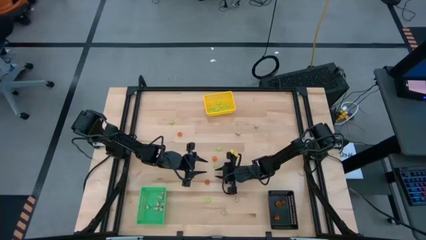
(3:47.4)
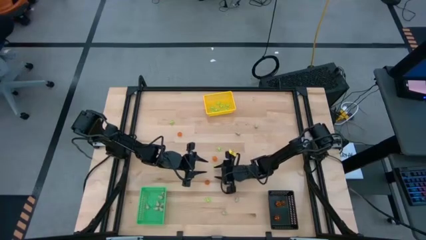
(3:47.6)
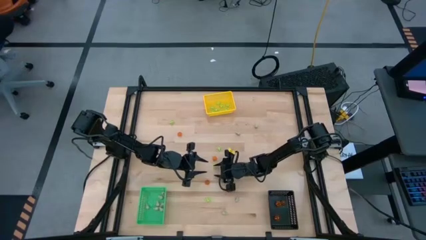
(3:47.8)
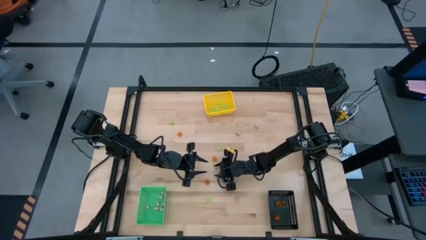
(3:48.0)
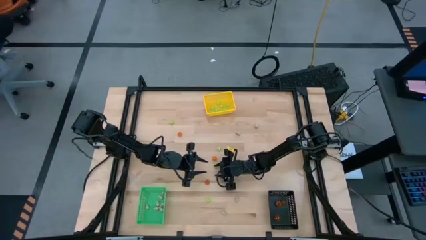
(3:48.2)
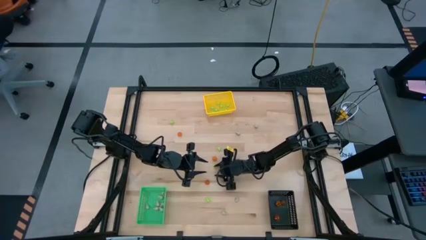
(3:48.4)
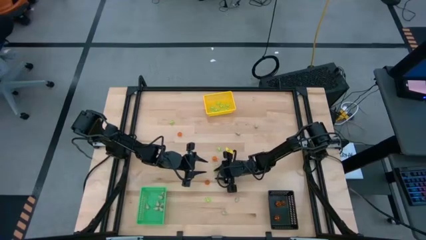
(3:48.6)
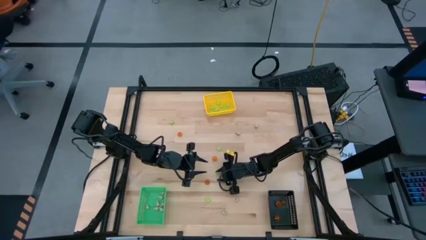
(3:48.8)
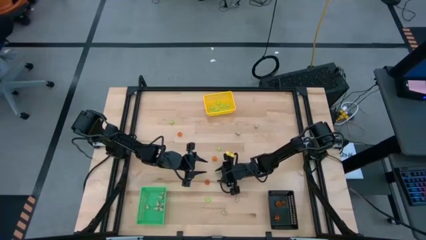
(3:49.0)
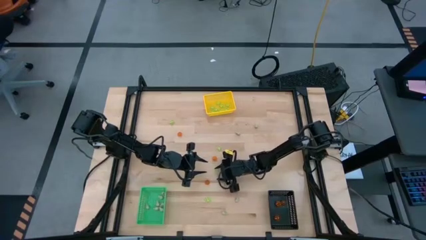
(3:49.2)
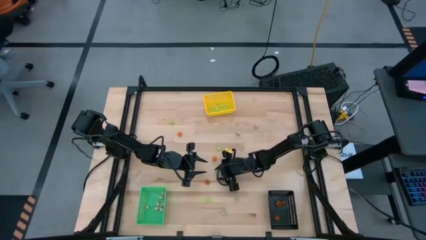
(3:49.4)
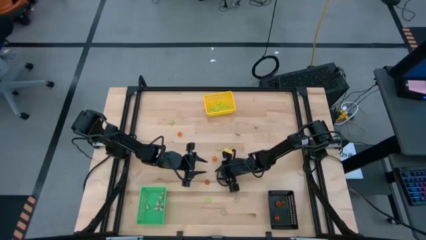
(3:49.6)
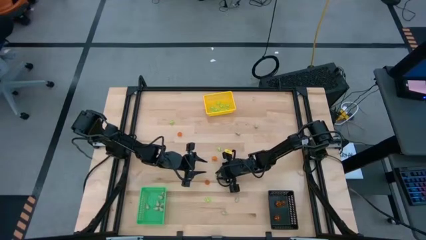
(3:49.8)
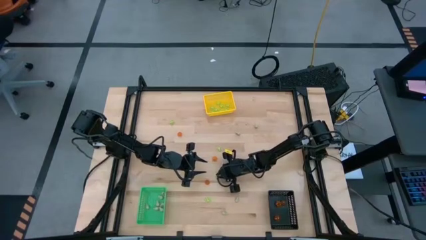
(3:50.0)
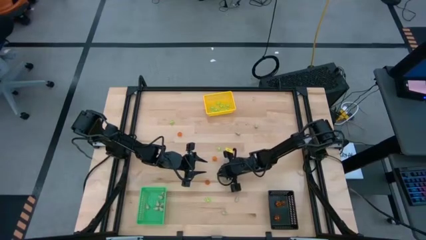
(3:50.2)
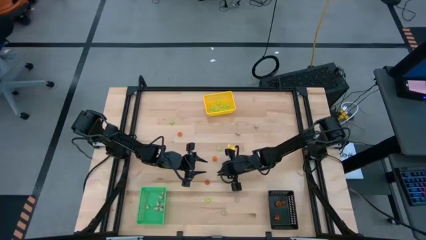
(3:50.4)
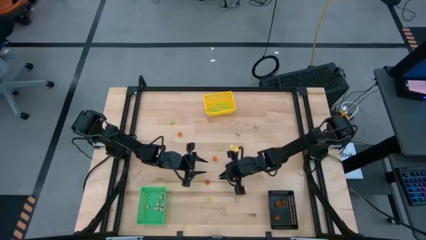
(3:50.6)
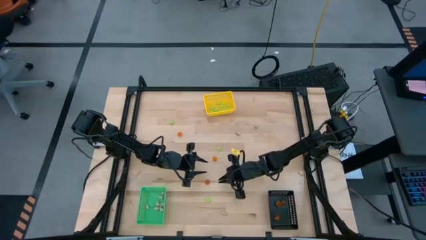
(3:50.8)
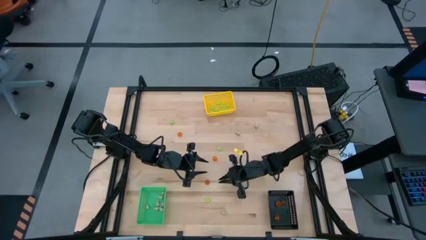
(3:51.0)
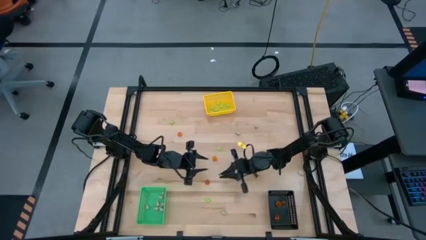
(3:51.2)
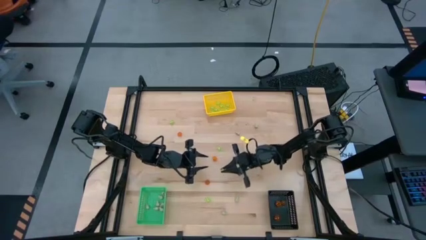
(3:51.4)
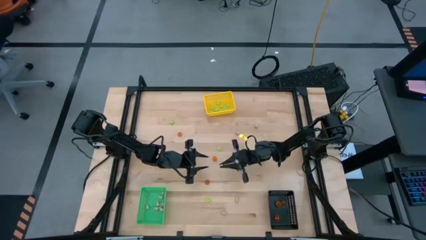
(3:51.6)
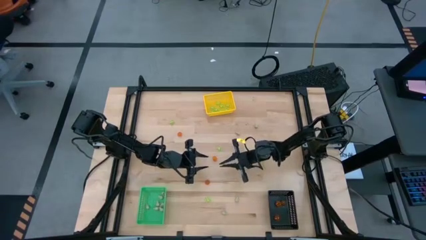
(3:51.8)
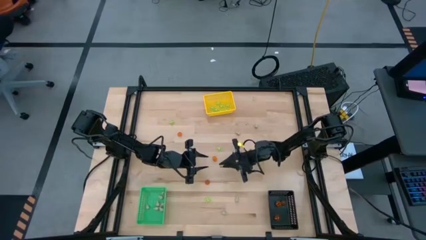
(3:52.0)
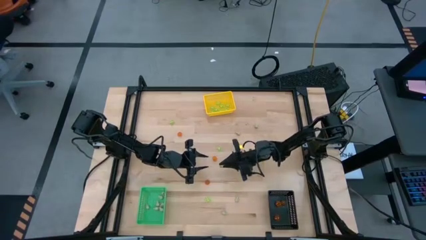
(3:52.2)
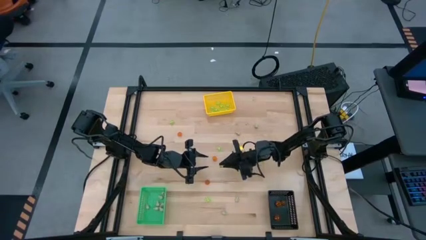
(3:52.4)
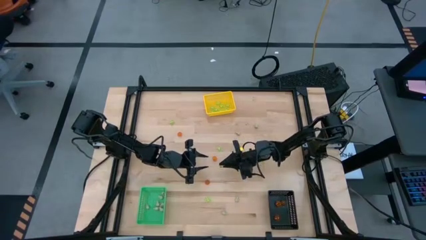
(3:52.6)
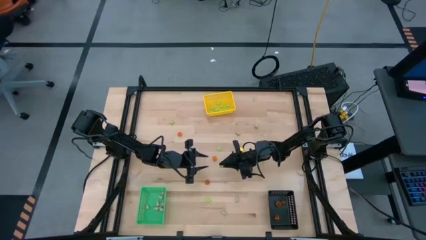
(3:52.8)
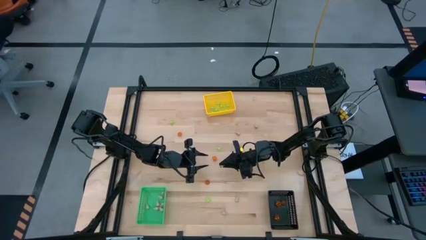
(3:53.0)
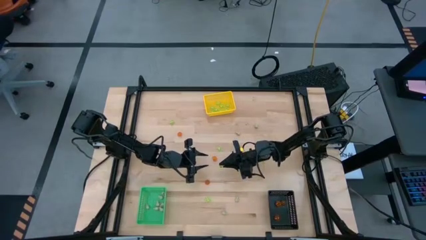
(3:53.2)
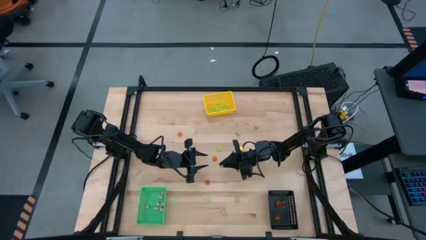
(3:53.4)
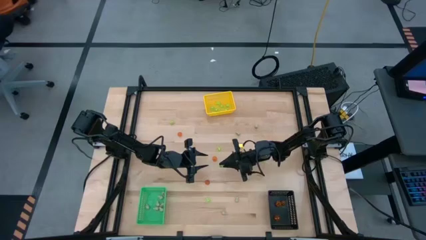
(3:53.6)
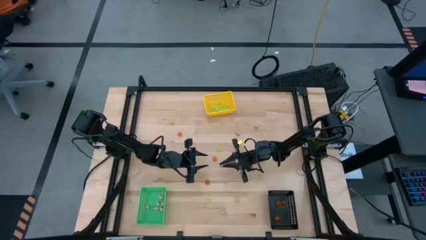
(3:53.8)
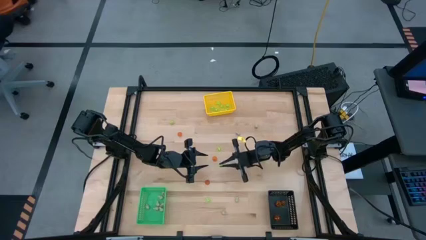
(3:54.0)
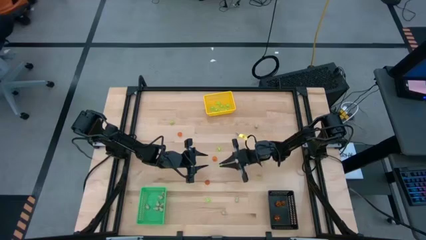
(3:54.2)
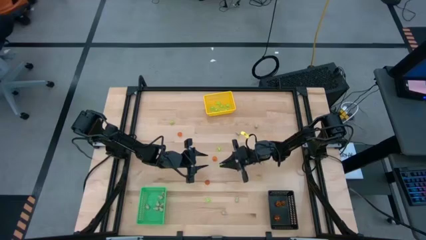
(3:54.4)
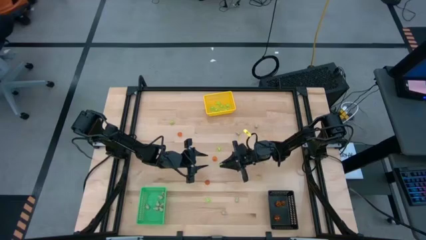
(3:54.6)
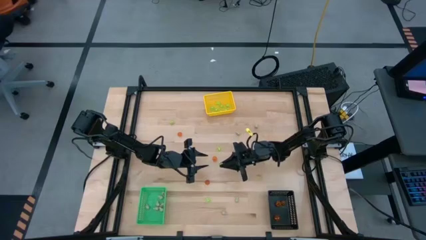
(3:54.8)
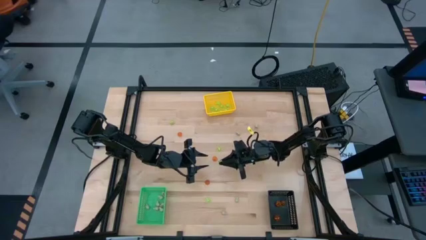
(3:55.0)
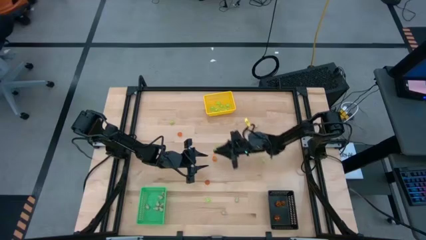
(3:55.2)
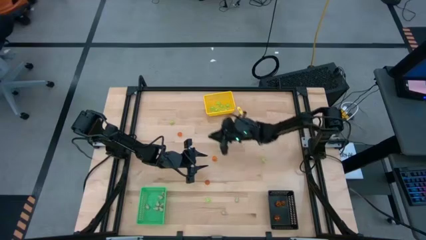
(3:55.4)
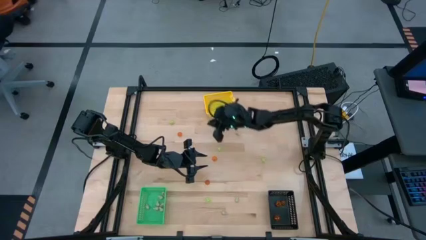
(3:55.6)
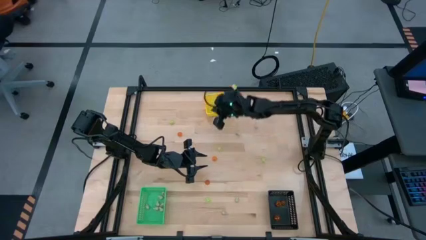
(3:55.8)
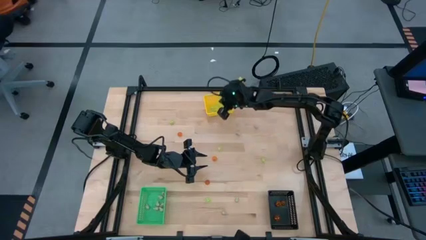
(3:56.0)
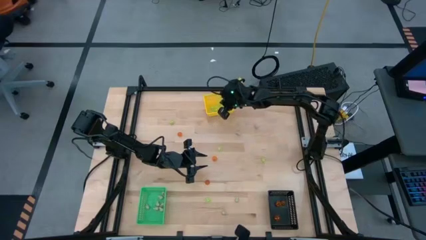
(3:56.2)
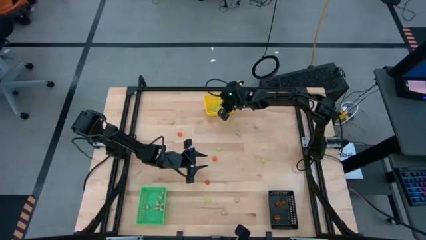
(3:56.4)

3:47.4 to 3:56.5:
Task: Sort Halloween decoration
Put the green spider toy into the yellow bin

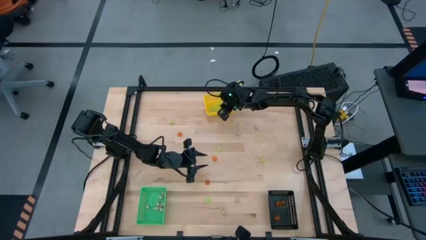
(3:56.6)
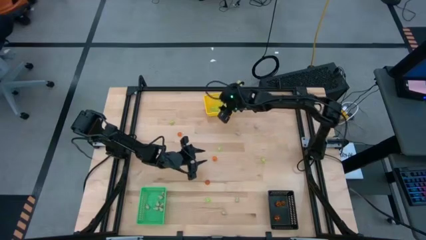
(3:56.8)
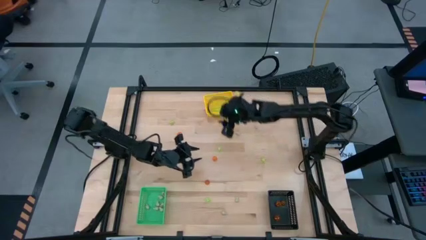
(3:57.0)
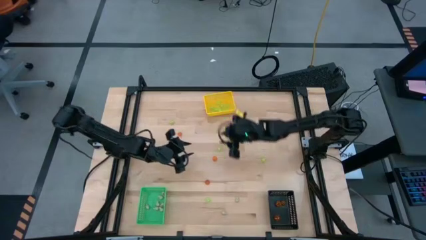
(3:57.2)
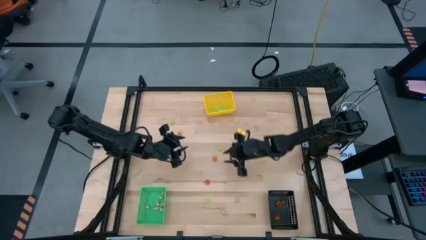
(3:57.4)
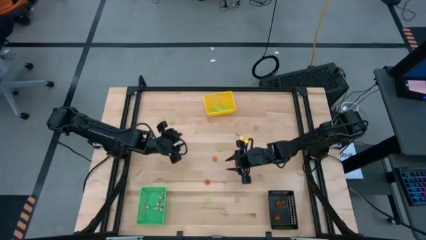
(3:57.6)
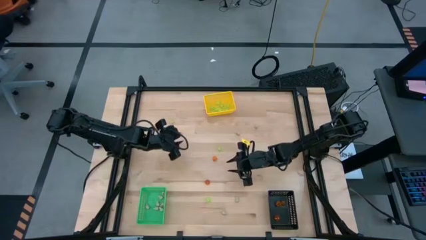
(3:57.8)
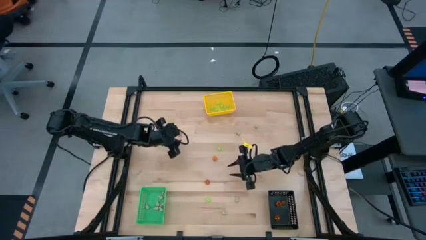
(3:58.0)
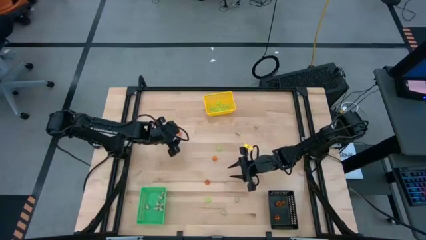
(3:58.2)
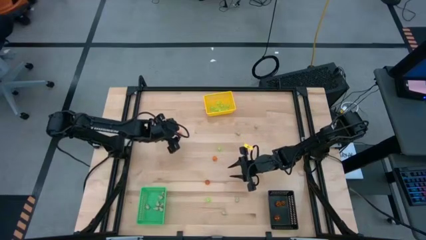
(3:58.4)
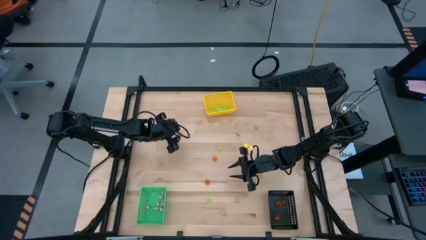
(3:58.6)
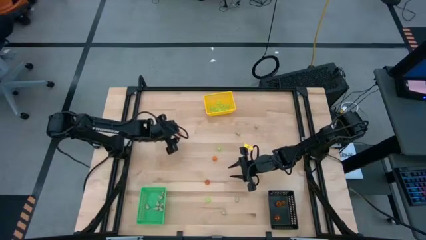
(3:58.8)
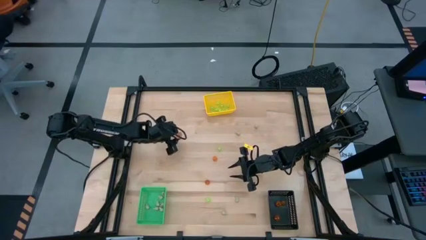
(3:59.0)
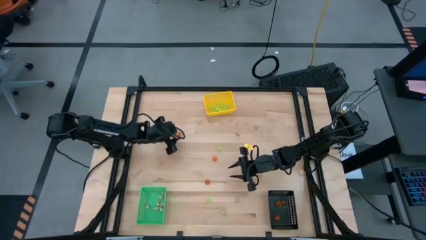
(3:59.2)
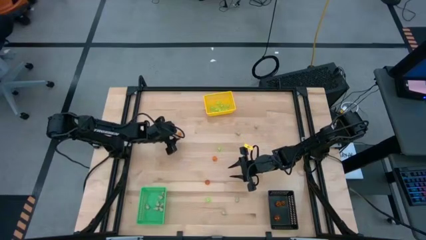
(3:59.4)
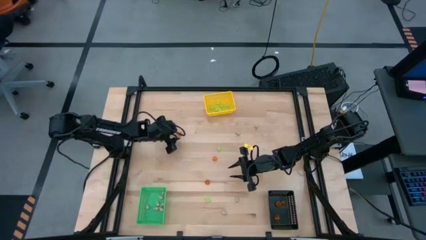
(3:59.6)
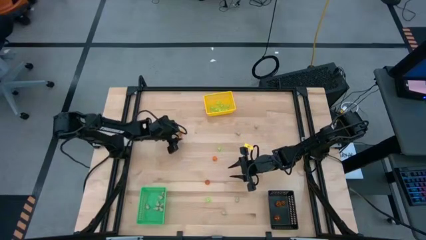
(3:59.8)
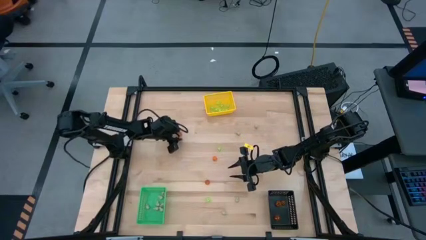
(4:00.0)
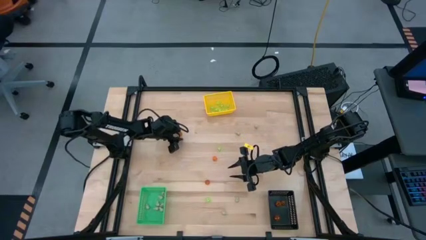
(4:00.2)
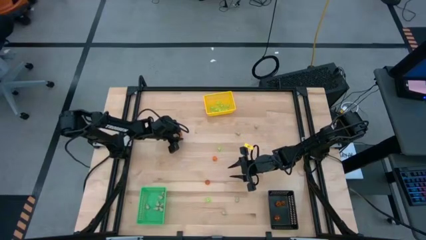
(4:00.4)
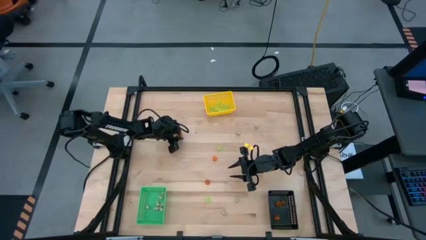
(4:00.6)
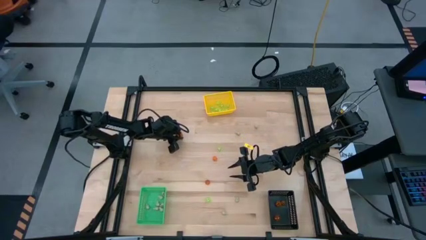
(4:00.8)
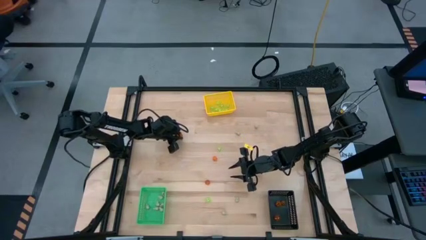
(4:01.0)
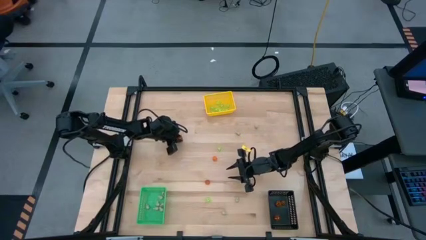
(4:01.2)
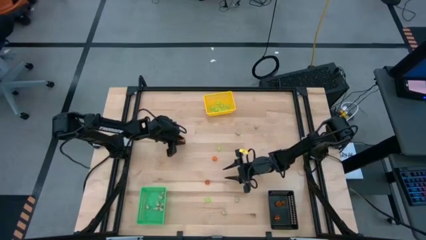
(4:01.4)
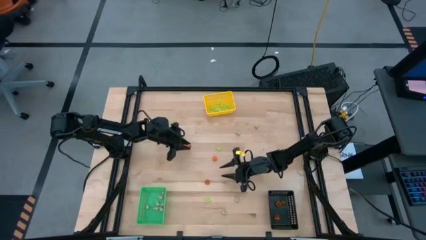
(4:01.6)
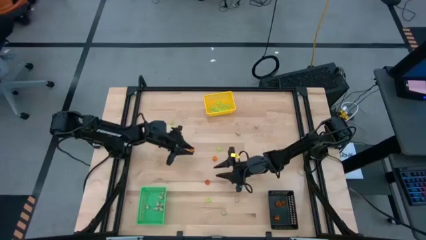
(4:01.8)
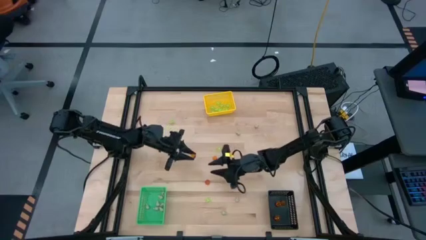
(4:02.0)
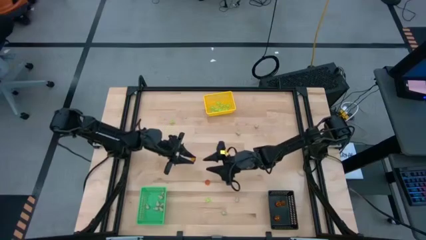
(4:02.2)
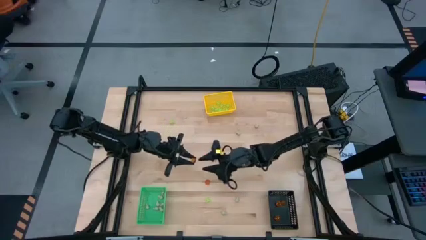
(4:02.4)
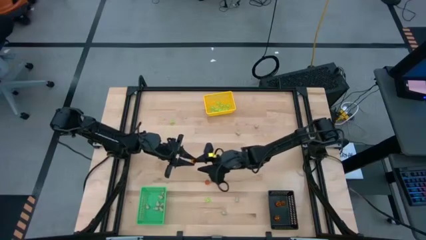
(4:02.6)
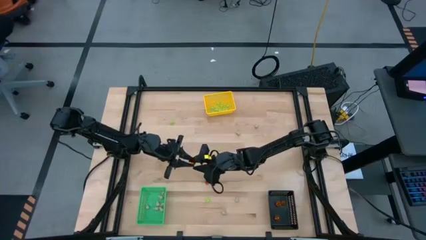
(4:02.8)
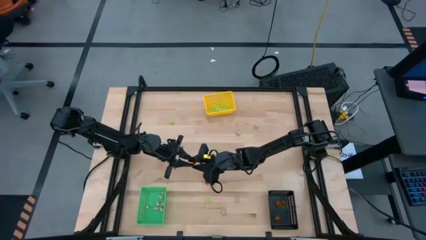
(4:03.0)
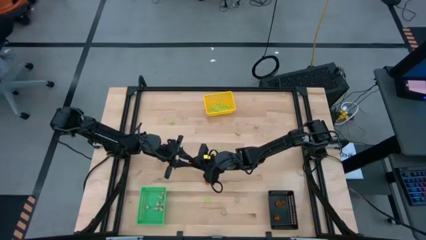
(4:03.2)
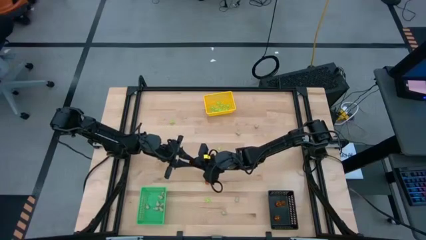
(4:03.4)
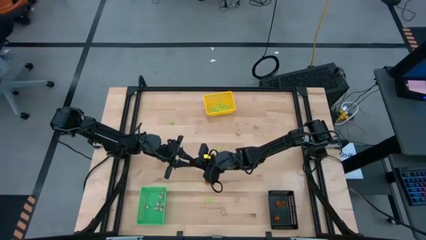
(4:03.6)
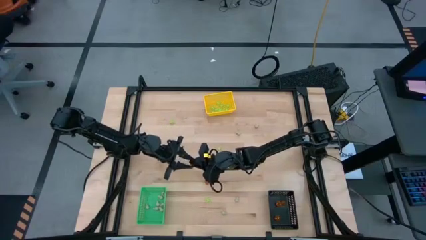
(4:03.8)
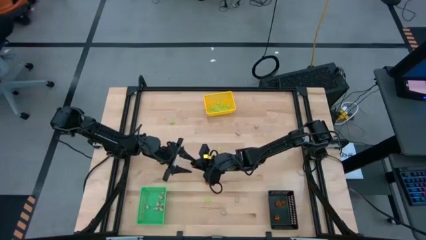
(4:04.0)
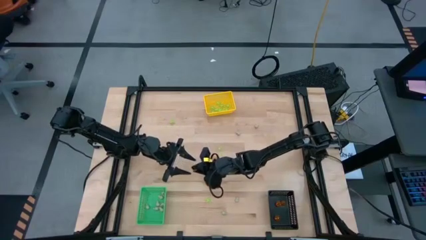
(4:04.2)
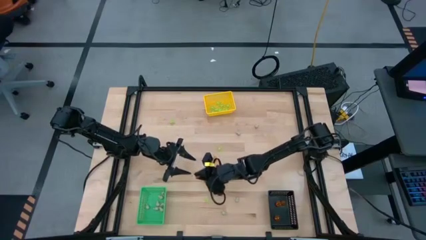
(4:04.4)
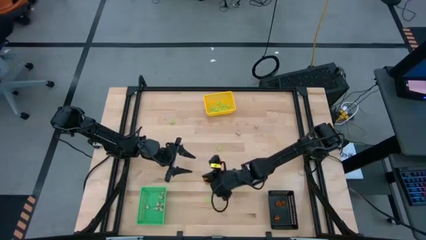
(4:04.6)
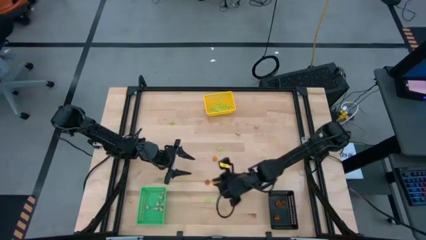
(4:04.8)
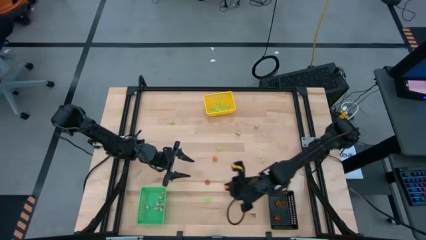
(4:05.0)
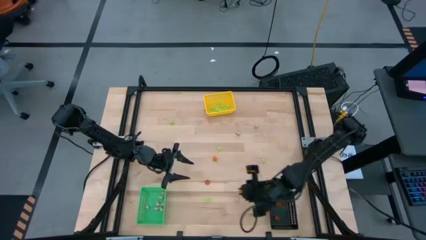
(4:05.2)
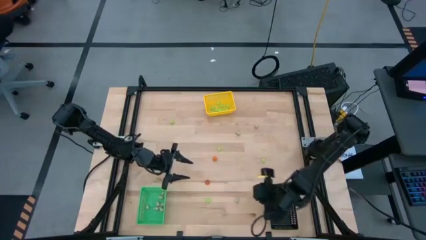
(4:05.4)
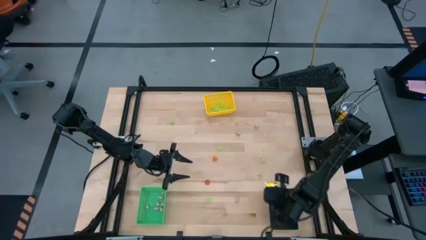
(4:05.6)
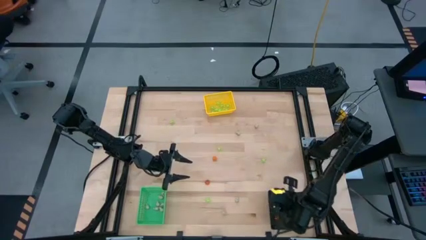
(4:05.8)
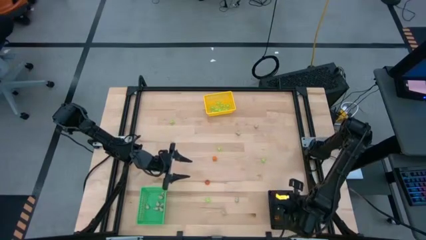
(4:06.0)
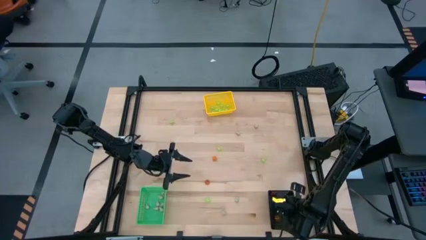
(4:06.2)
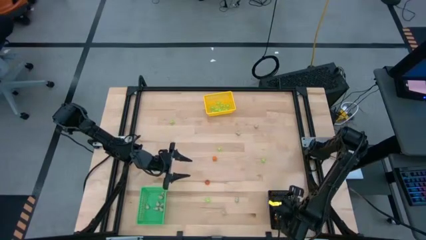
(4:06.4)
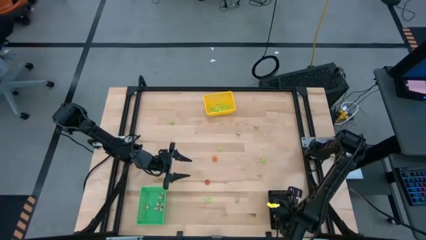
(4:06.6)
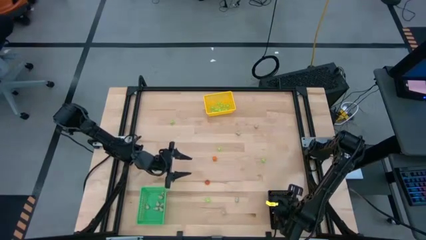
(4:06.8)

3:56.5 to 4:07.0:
Put the orange pumpkin toy into the black bin
